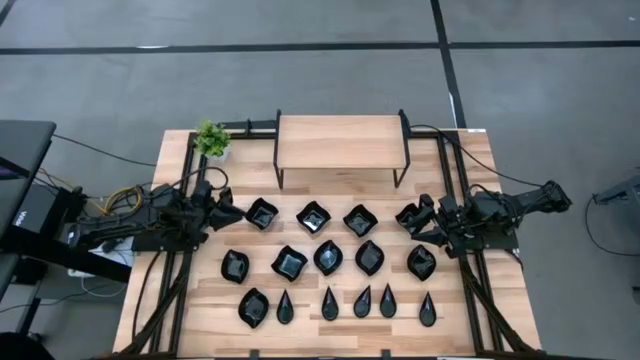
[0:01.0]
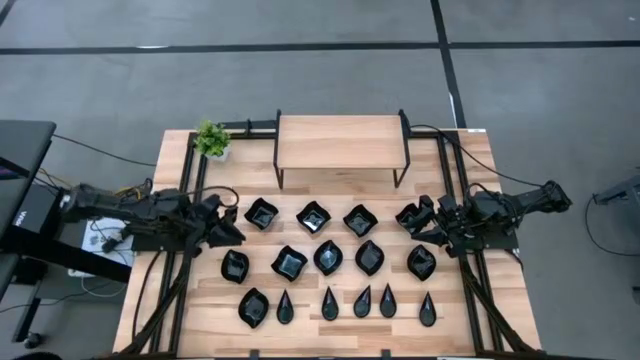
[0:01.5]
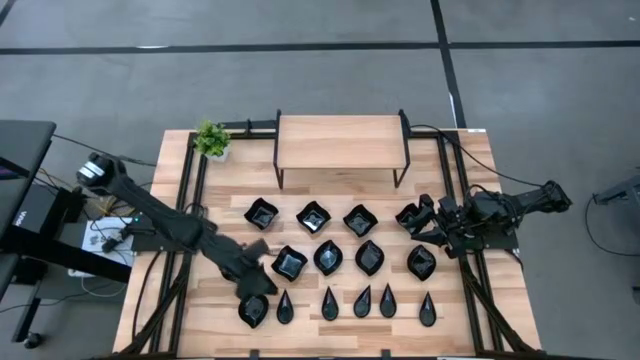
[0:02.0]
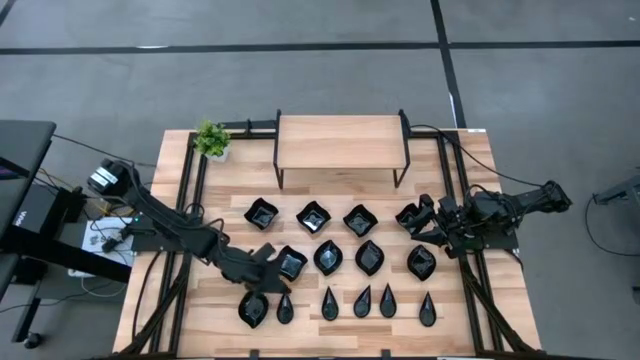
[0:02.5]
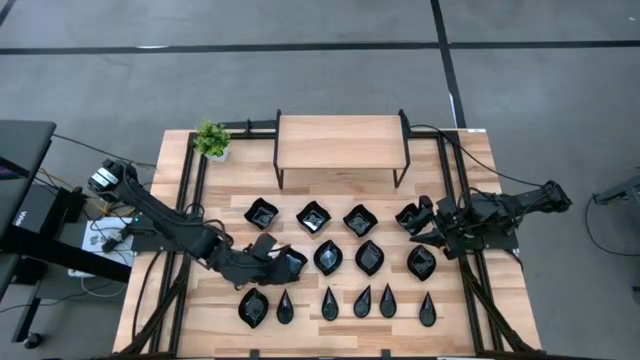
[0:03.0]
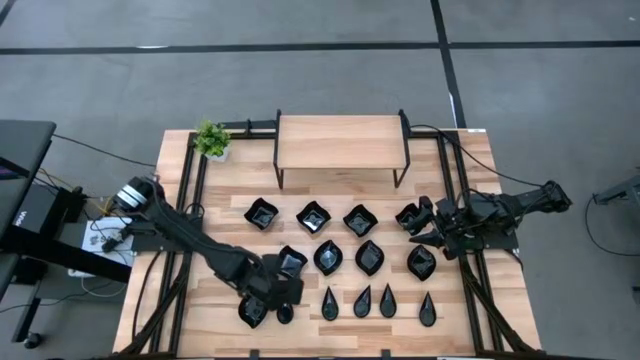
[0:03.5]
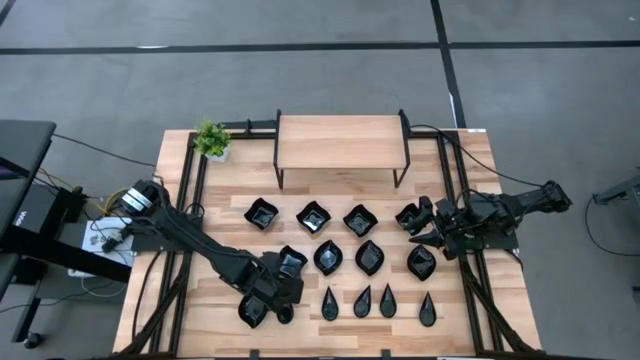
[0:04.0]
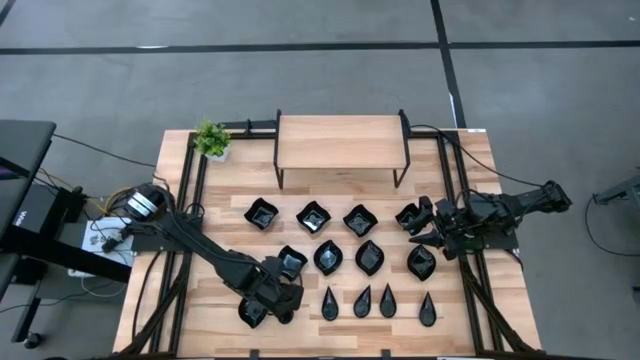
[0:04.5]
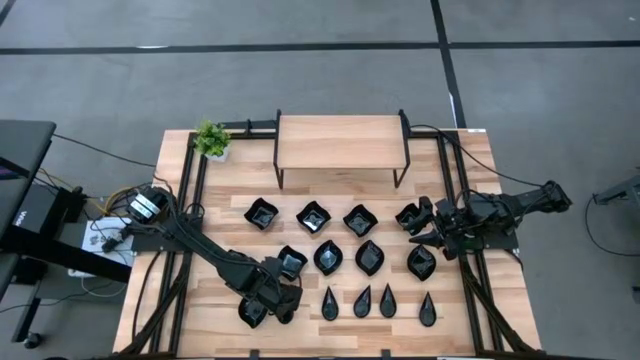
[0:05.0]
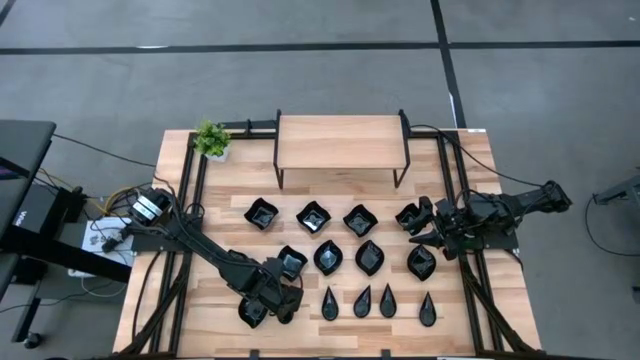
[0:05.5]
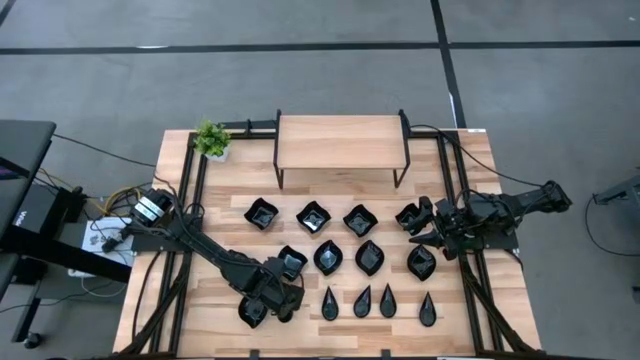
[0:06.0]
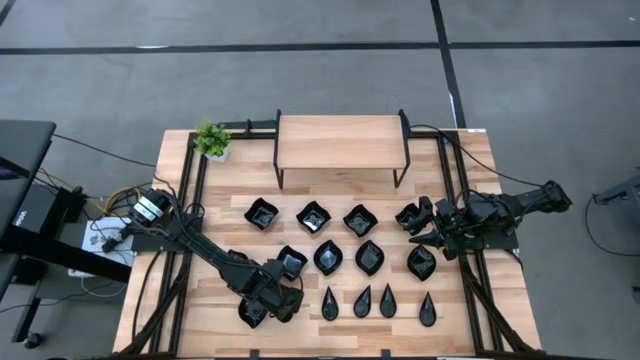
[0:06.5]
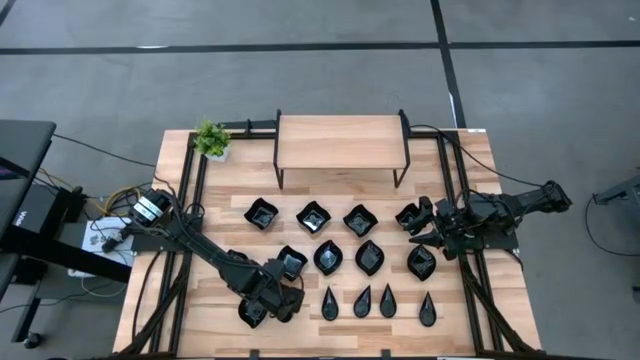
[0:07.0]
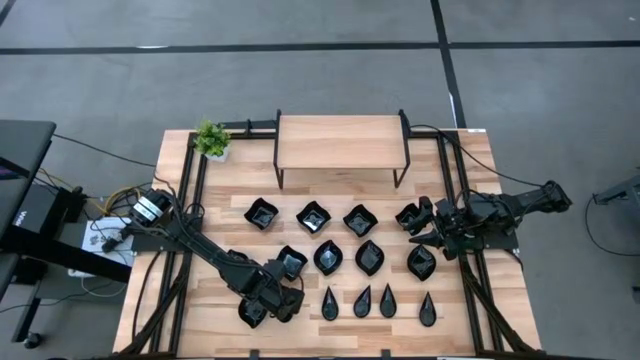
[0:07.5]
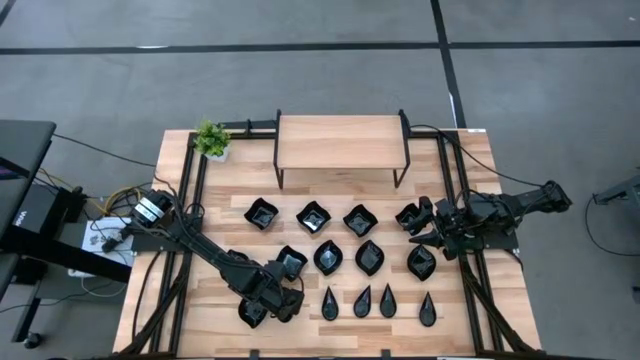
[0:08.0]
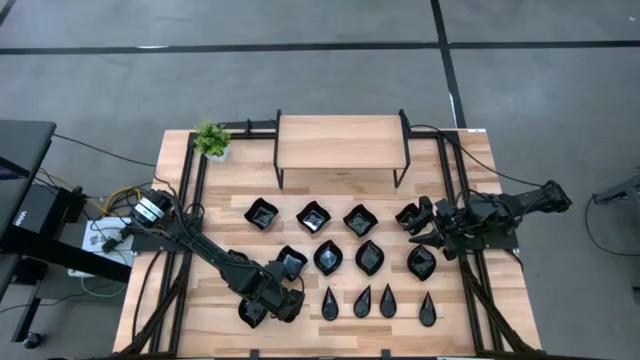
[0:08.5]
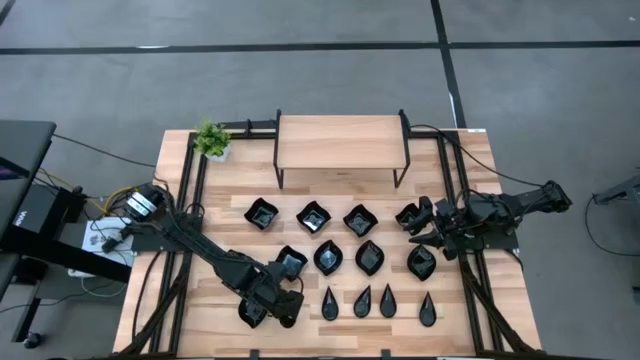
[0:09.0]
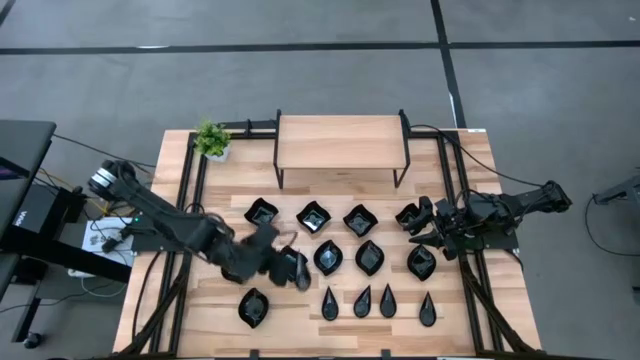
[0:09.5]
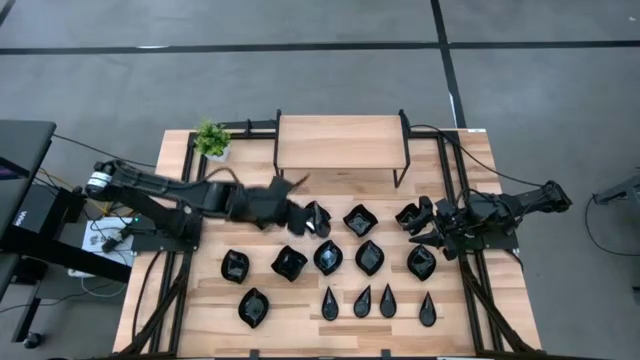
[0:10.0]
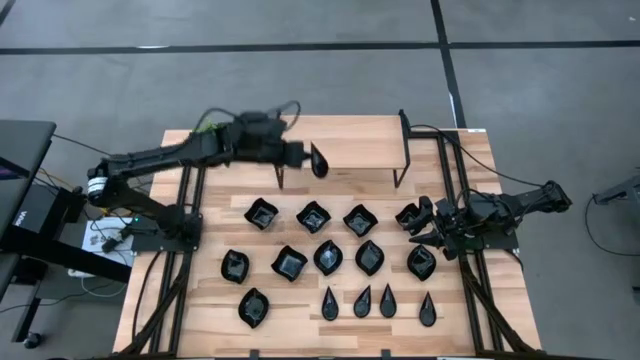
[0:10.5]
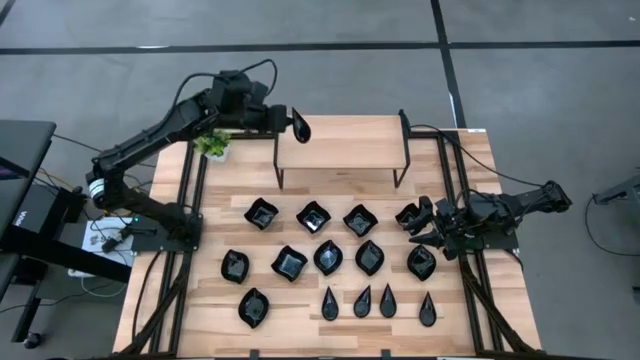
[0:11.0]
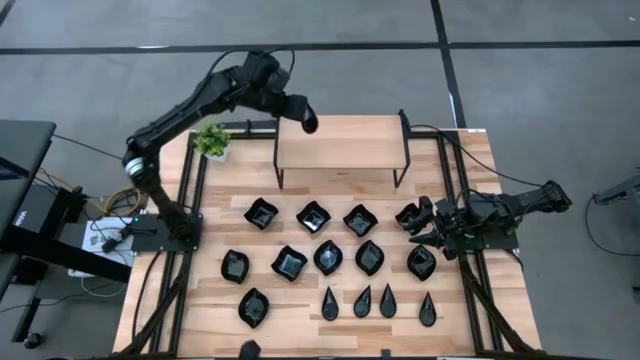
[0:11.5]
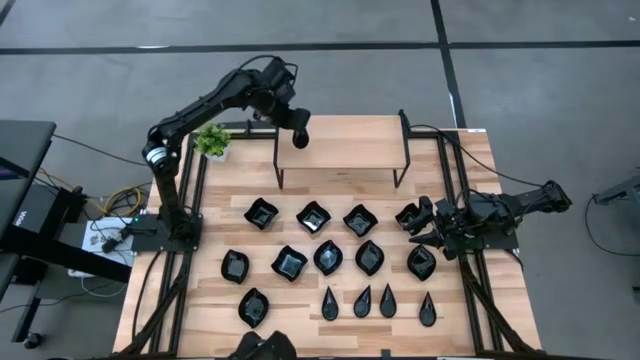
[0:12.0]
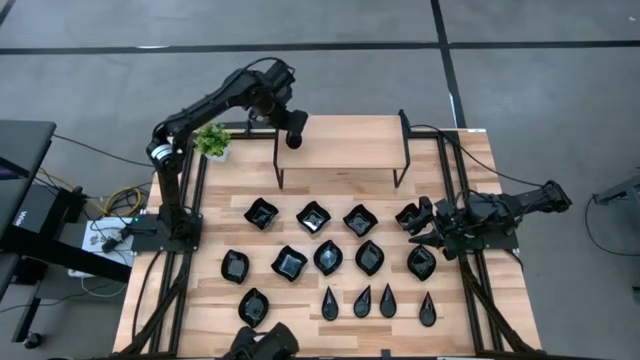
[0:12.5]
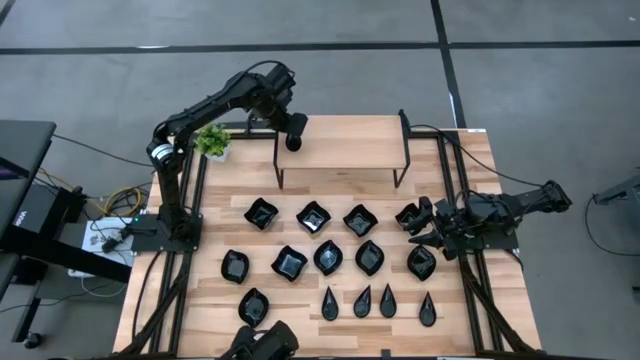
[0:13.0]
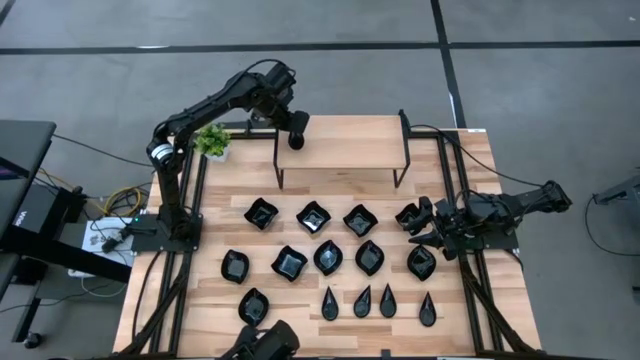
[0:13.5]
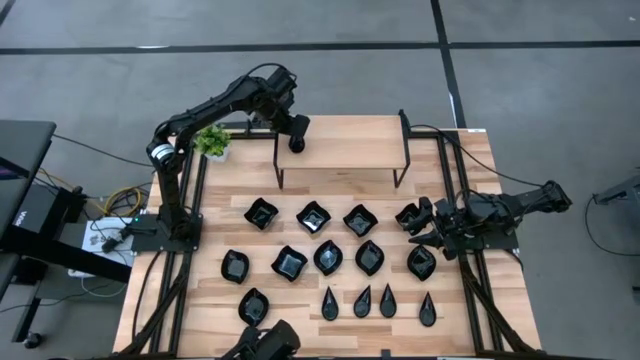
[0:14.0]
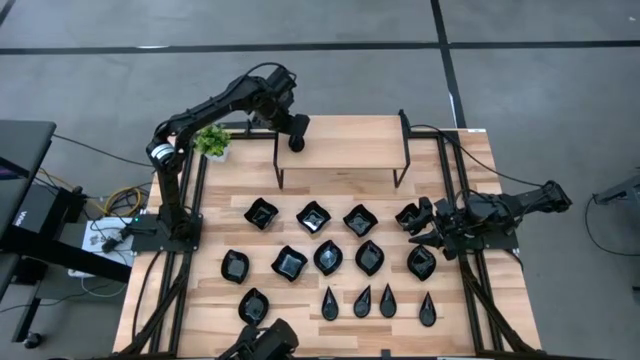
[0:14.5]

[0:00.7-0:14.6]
Task: Pick & Place Mini shaped plates
Put the black drop shaped plate on the shelf

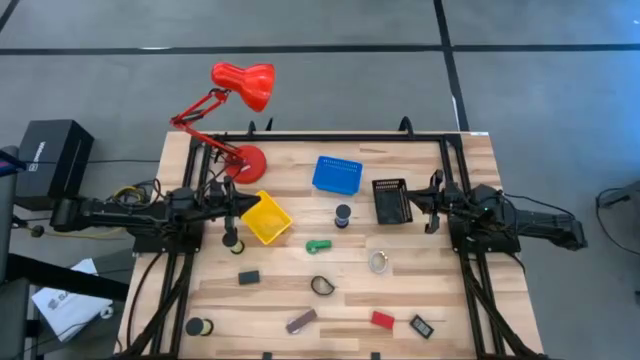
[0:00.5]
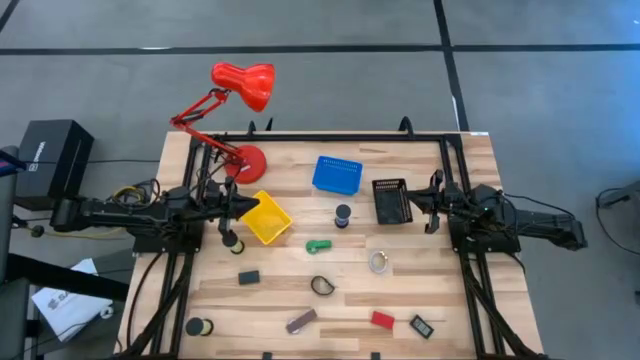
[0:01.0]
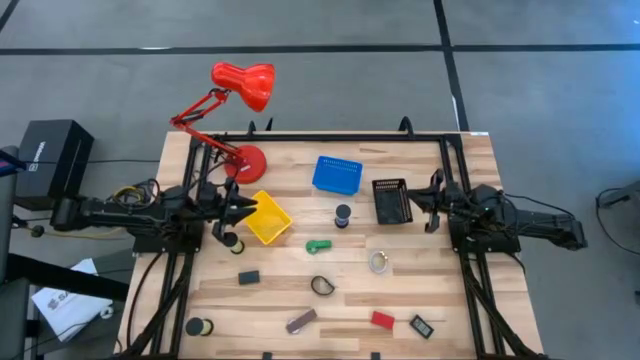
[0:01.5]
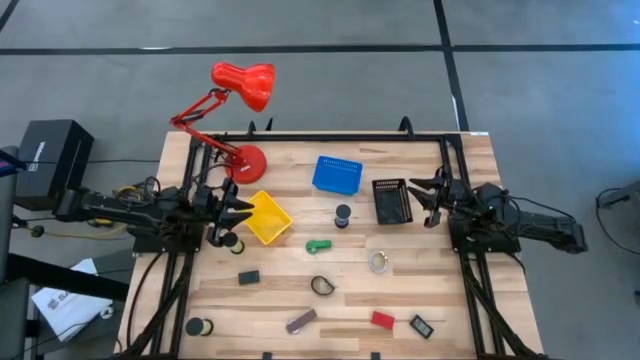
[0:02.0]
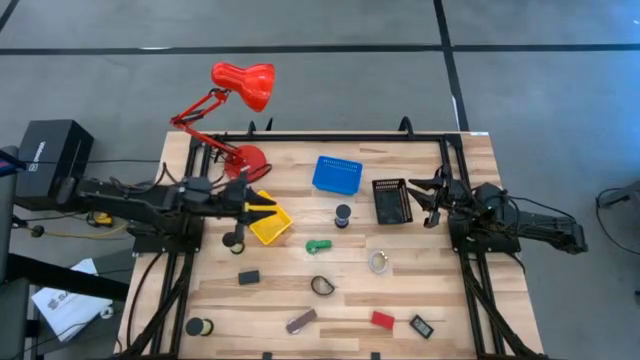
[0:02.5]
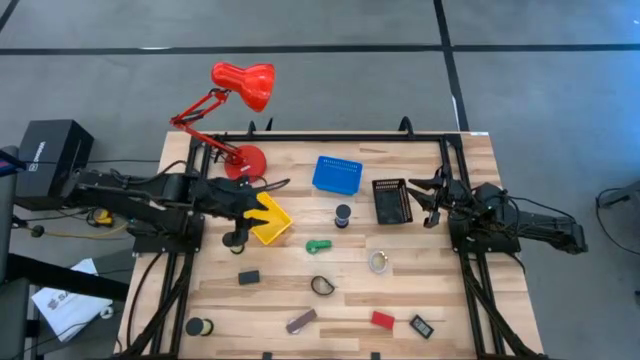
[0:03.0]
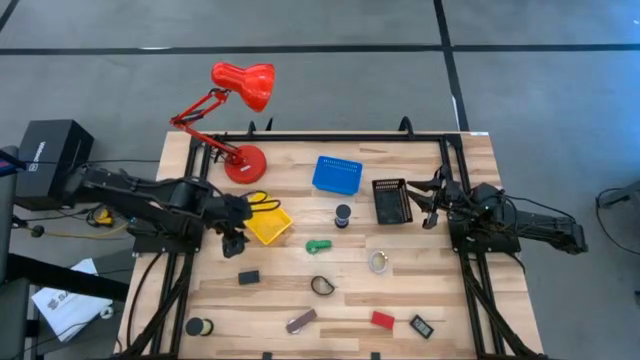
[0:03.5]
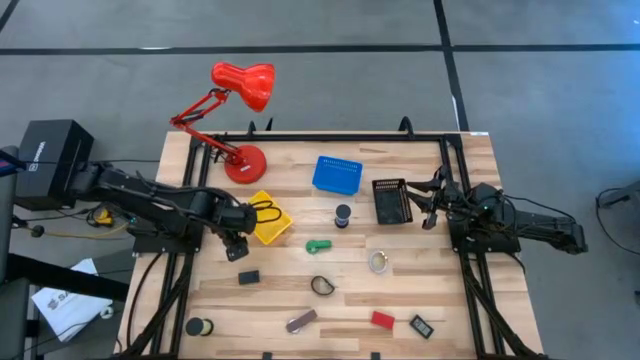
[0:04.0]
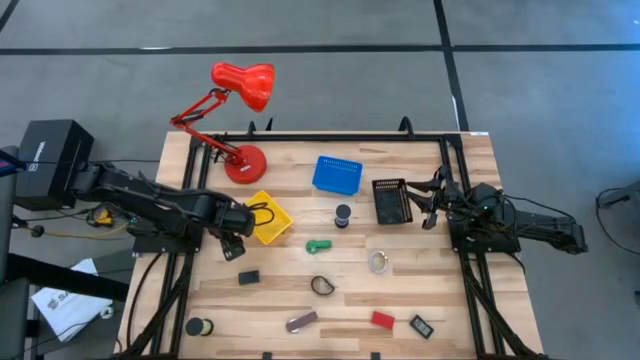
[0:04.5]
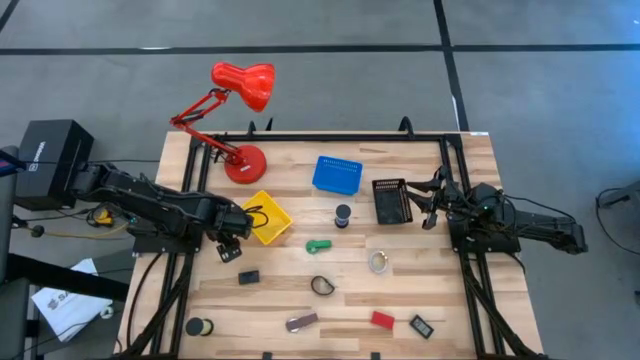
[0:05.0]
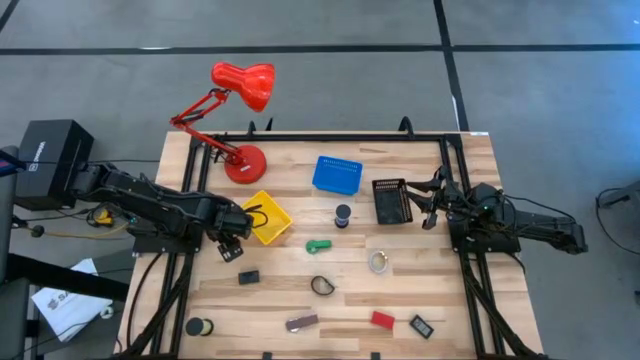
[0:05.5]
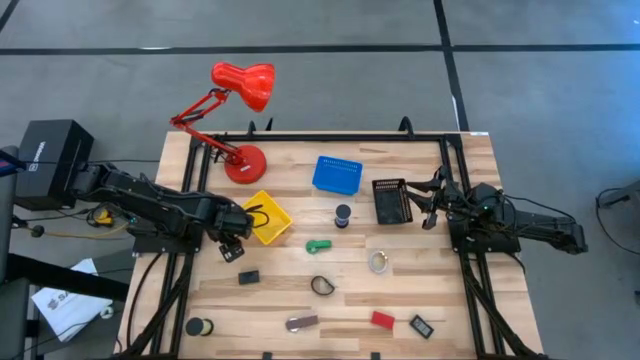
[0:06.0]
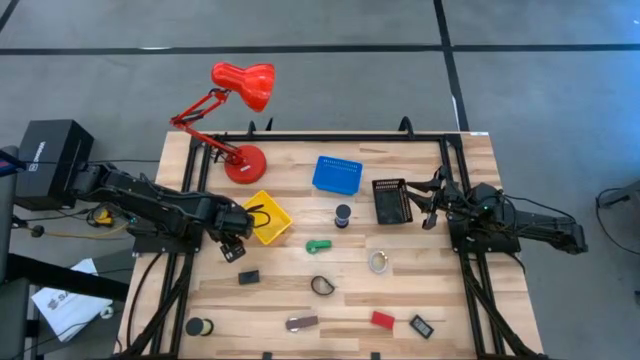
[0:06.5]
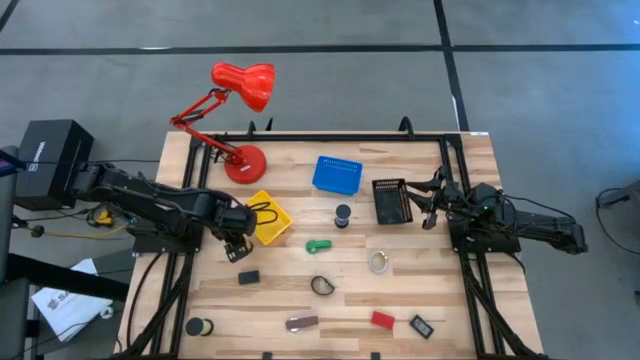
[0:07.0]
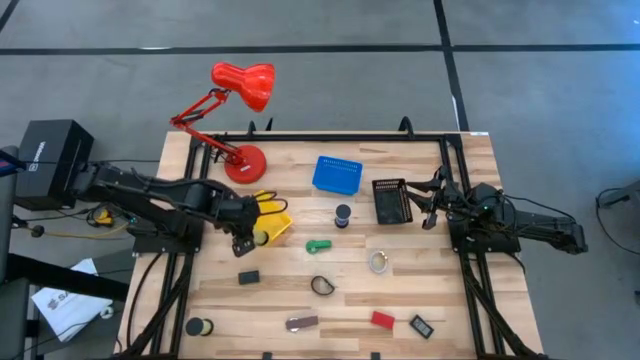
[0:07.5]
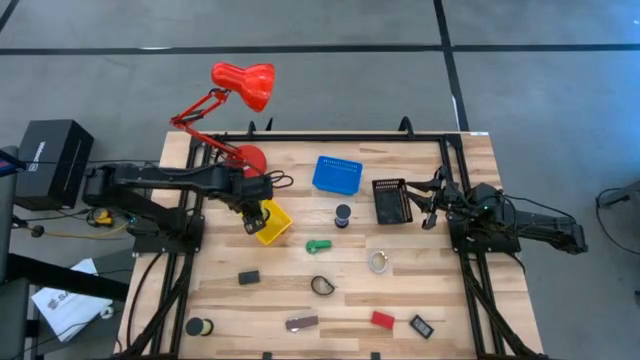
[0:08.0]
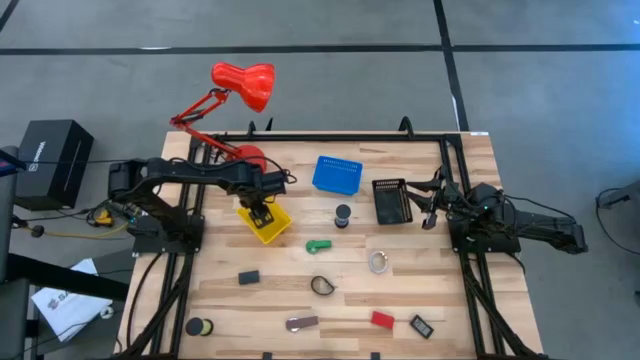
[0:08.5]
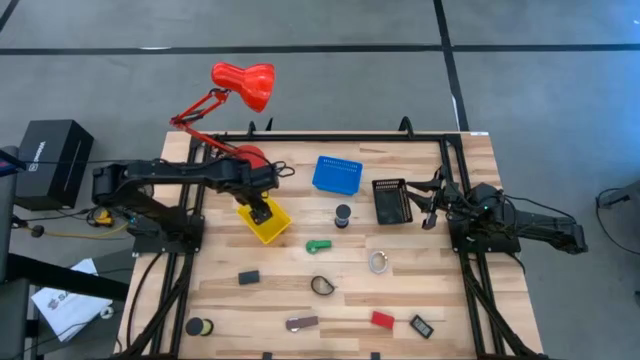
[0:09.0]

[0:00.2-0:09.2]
Task: Pick & Place Office items
Put the top green hourglass into the yellow bin
